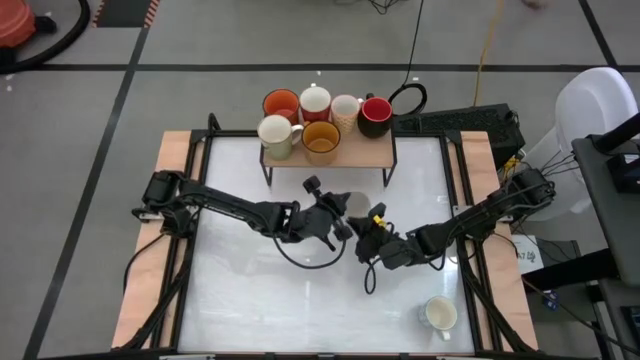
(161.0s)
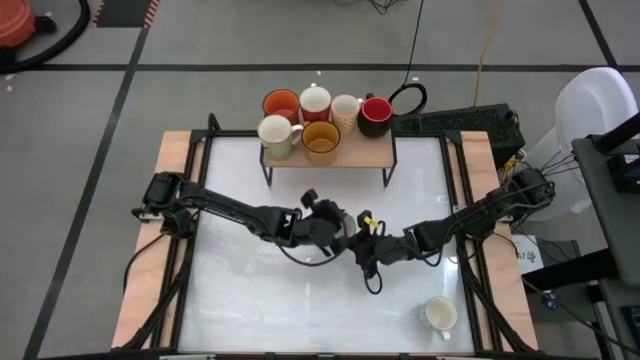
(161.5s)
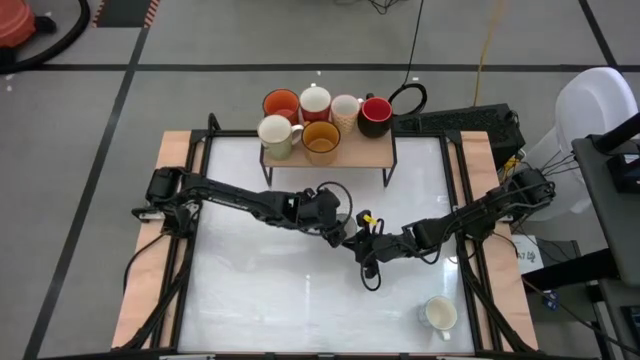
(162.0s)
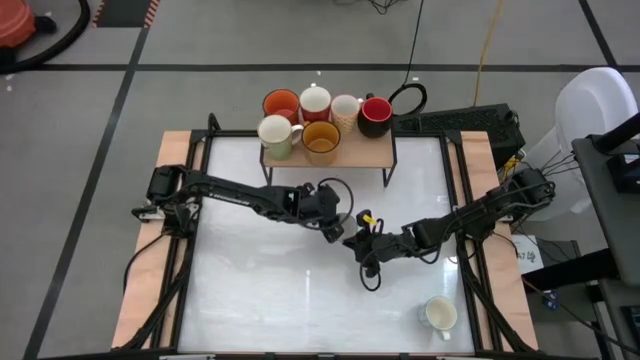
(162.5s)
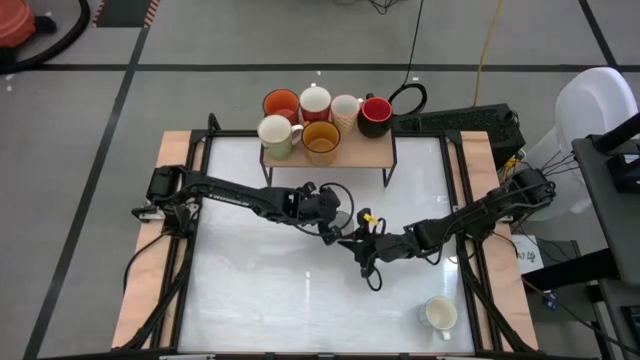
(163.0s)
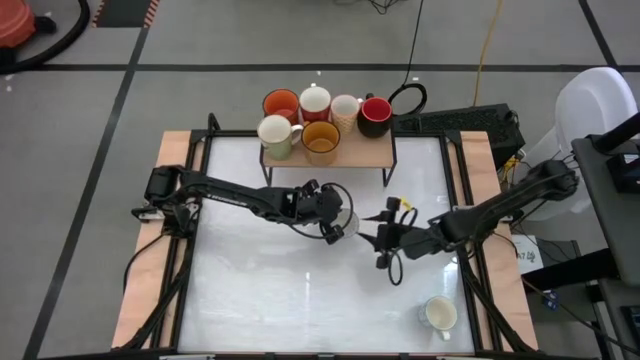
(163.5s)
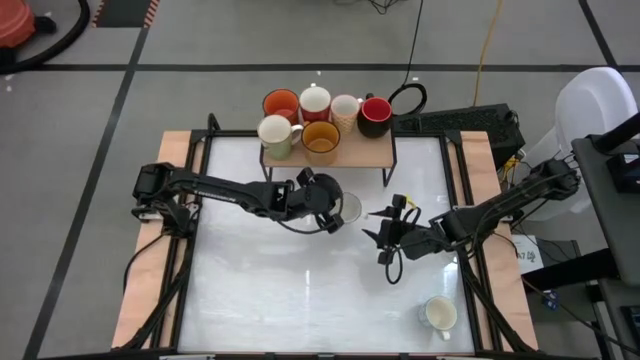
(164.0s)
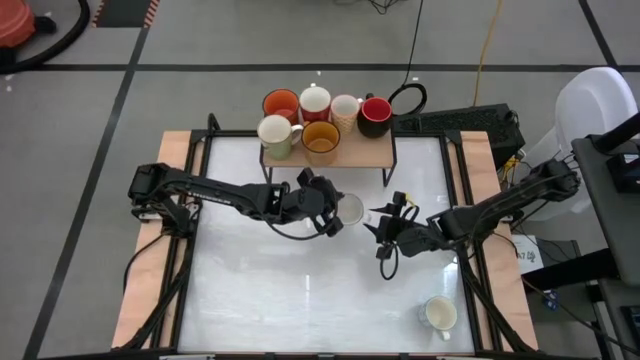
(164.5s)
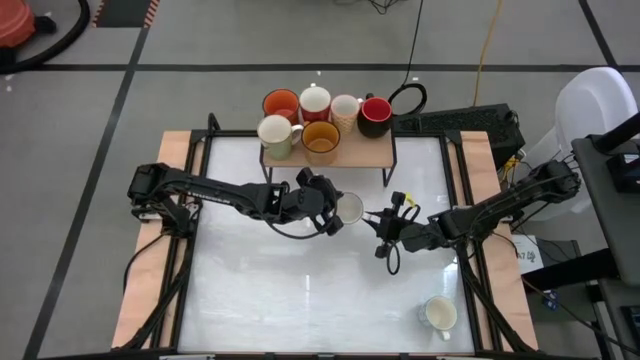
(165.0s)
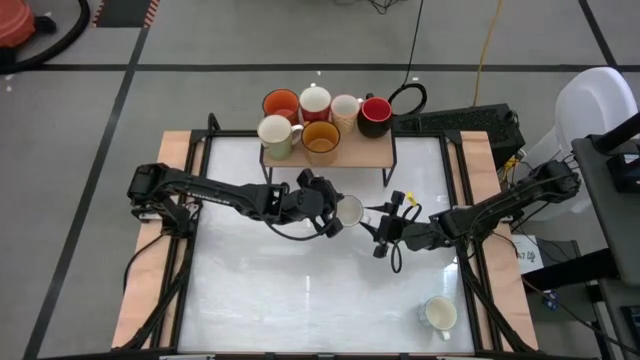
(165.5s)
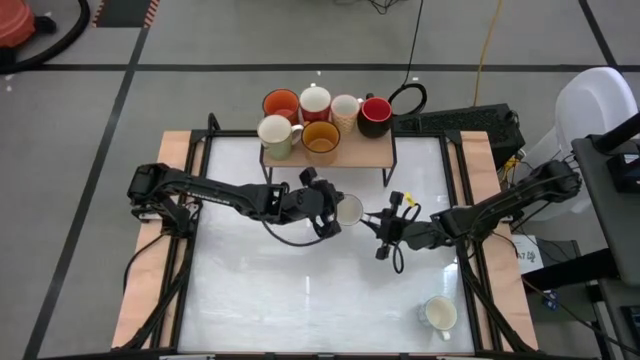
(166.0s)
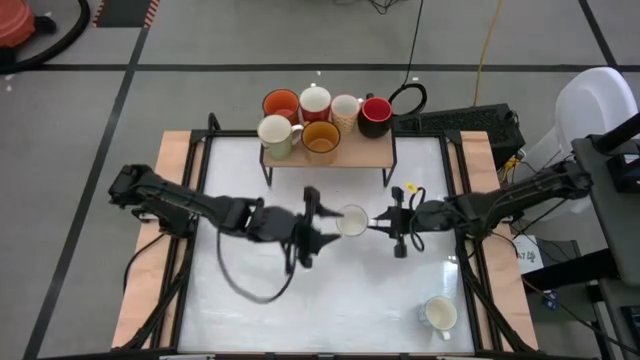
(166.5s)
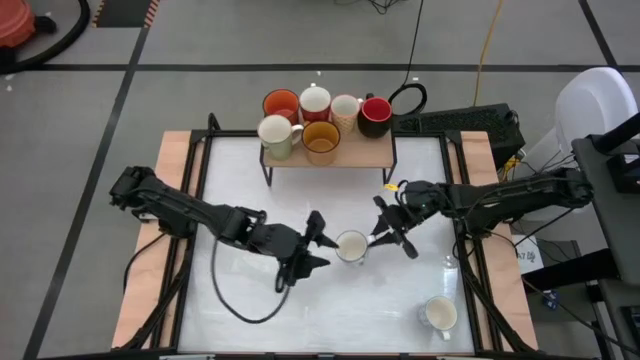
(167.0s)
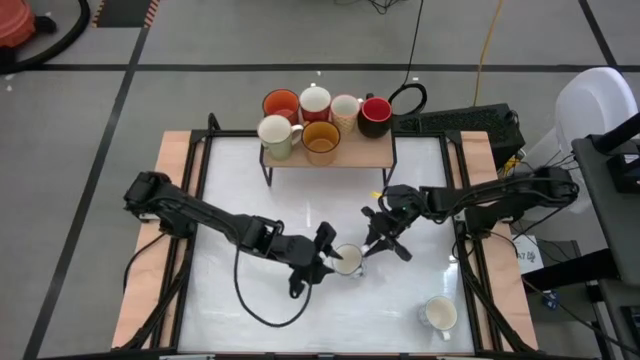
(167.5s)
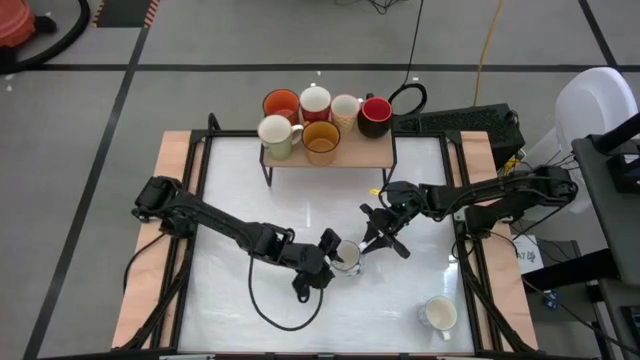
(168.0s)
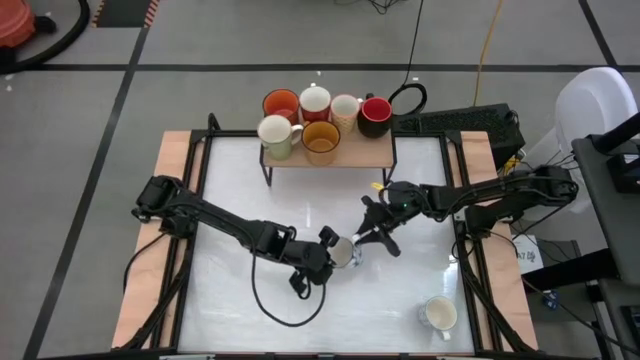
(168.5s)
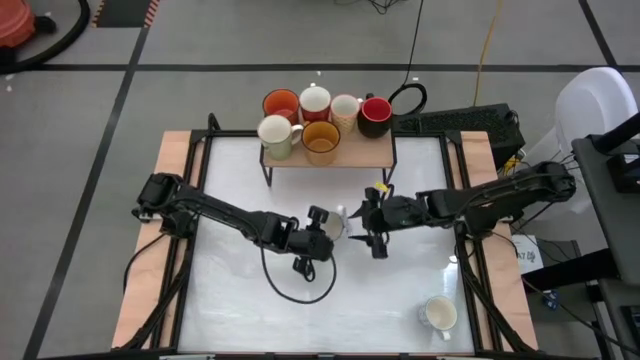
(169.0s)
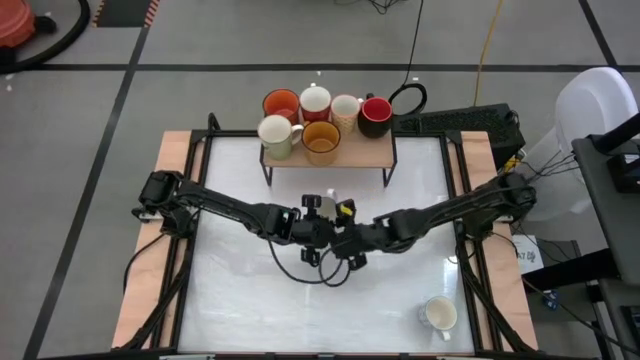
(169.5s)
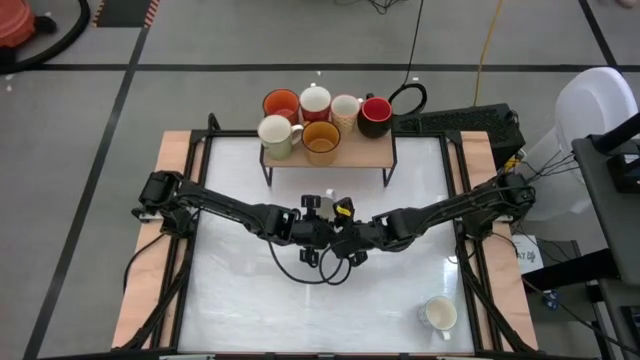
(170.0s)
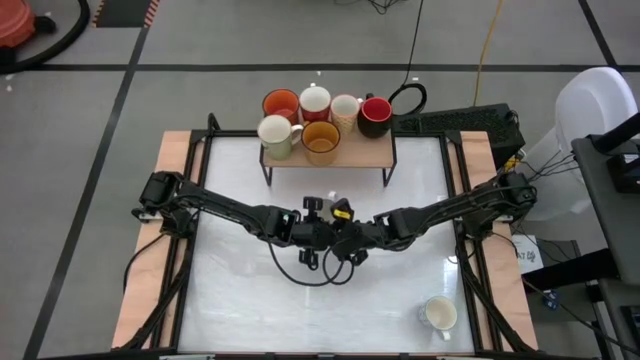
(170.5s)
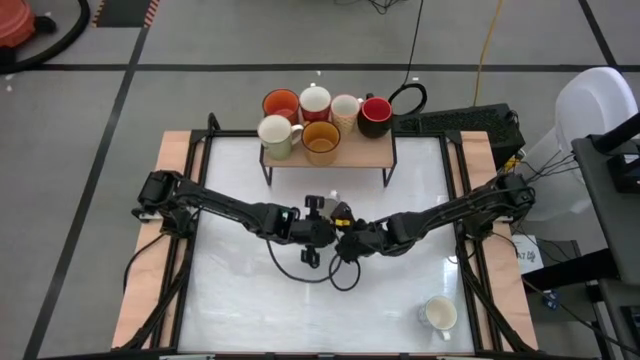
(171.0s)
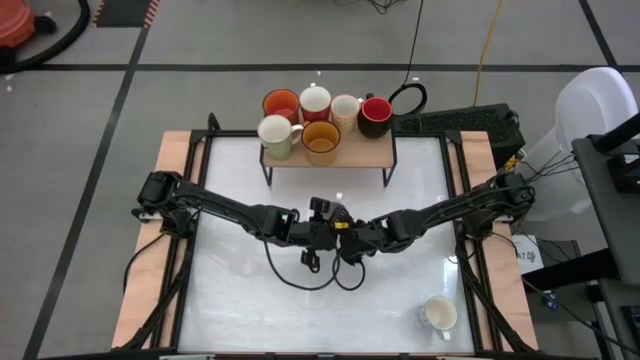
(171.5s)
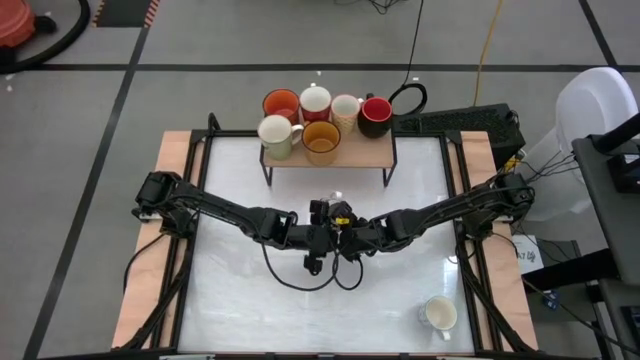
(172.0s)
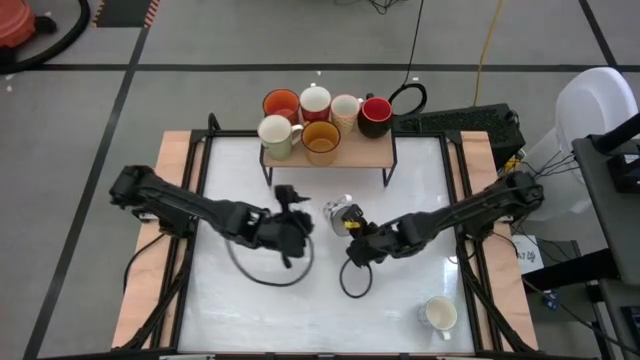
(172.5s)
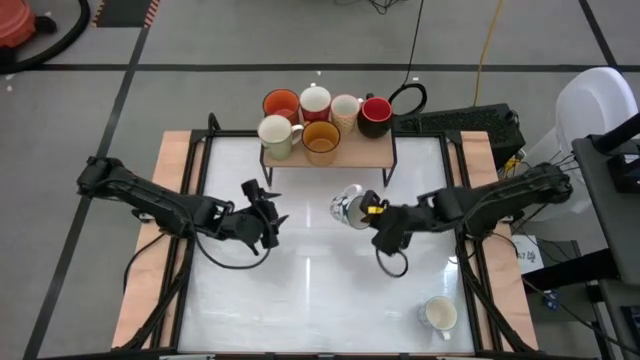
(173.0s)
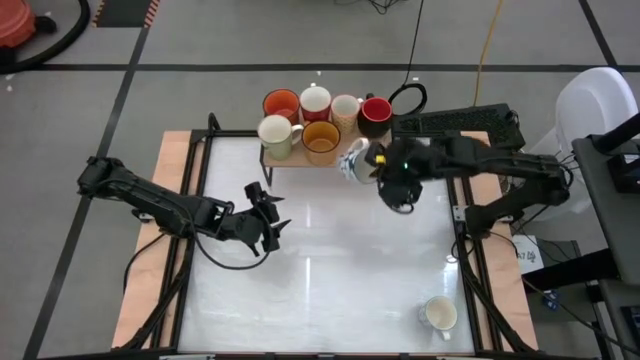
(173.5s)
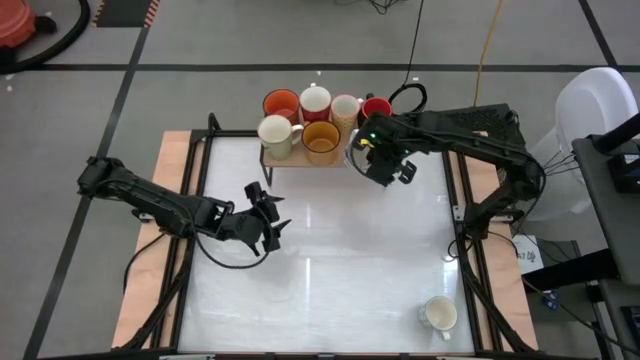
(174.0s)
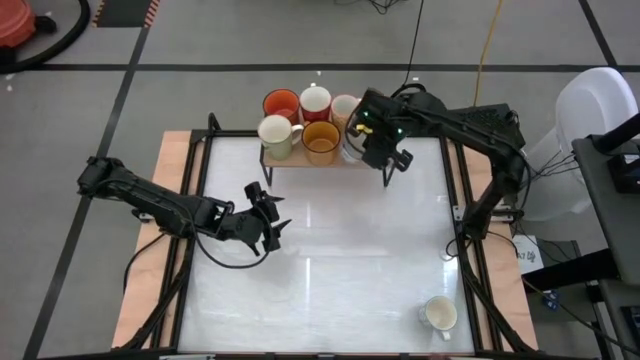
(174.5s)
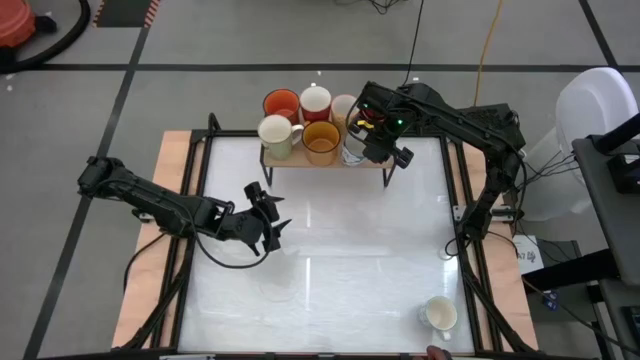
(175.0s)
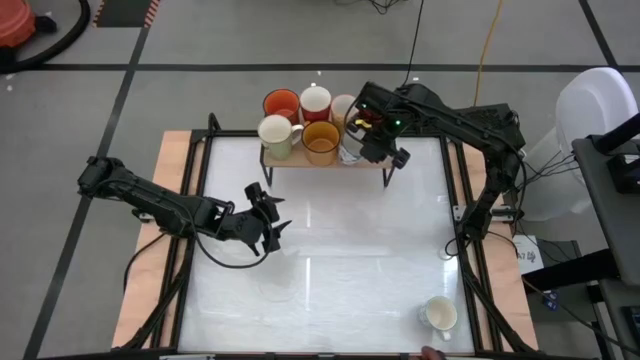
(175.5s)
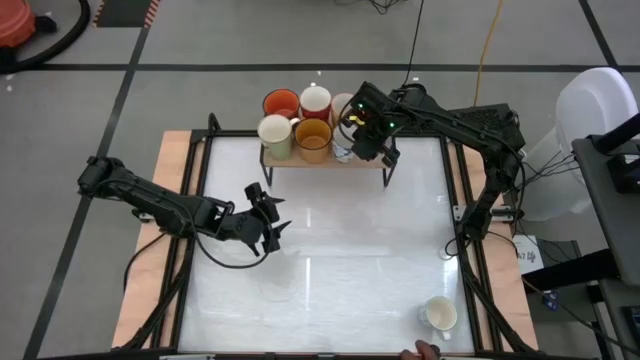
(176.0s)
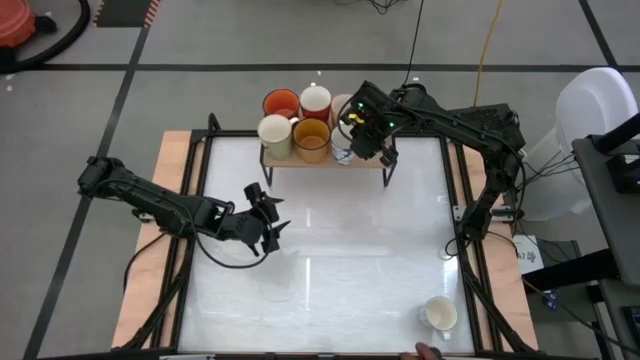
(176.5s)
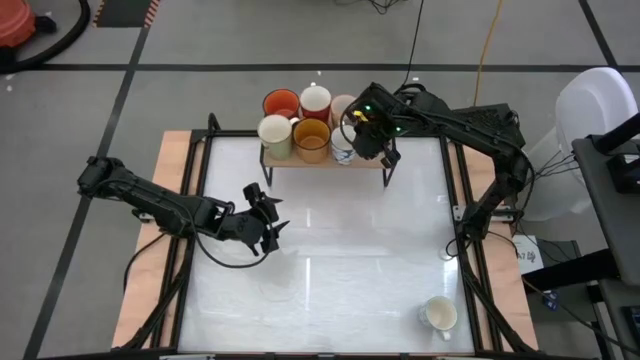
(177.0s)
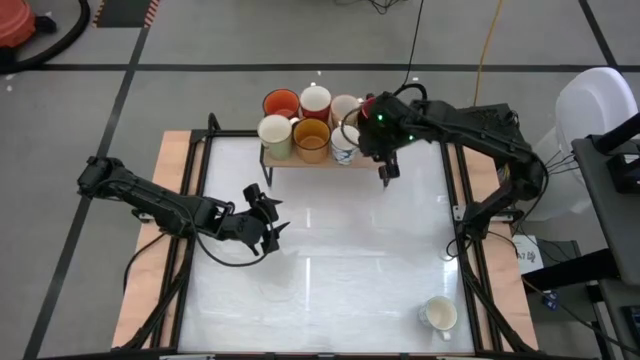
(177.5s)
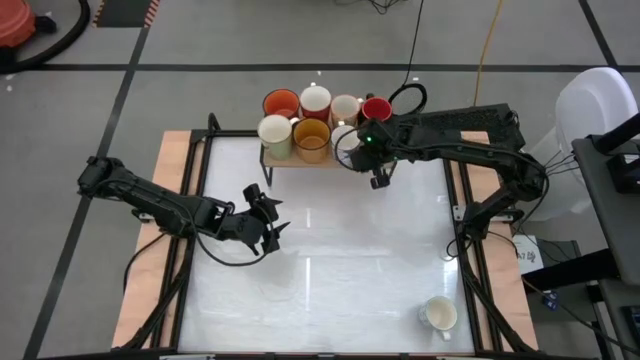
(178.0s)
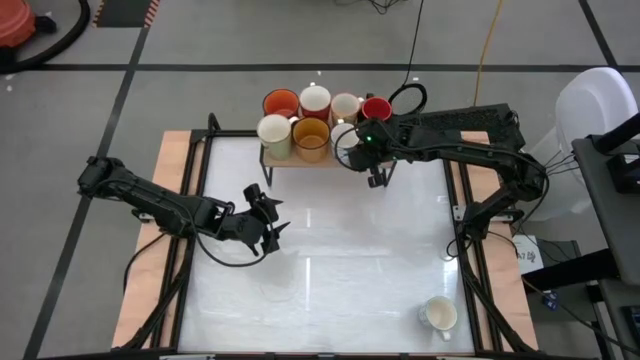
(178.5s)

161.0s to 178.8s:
Task: Place coffee mugs
Put the blue patterned mug on the shelf

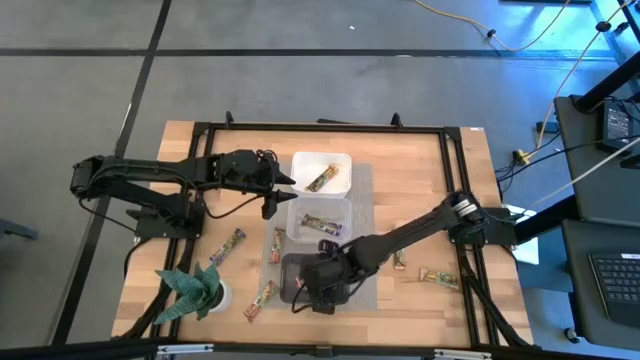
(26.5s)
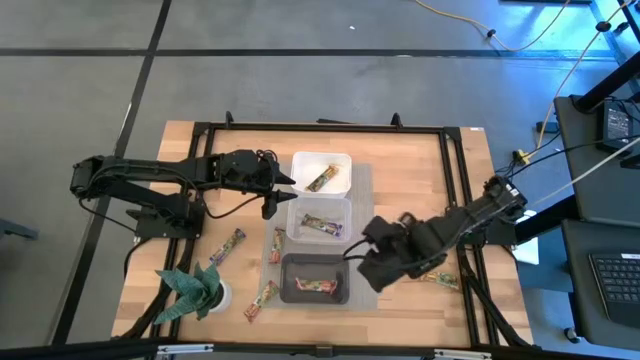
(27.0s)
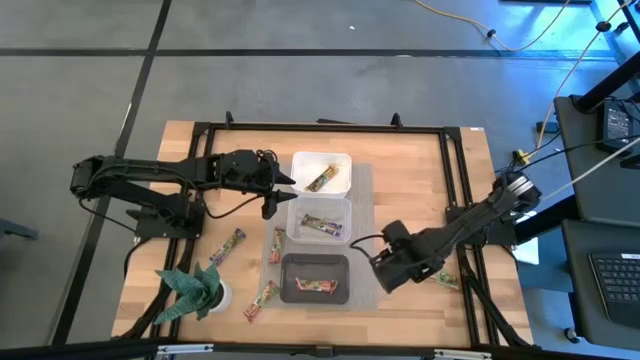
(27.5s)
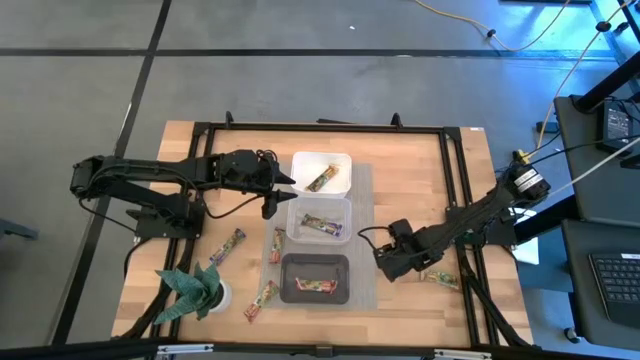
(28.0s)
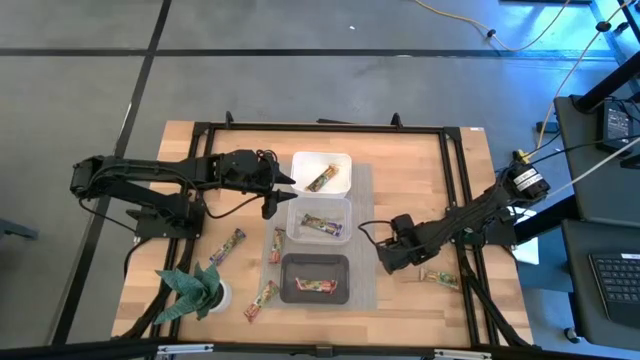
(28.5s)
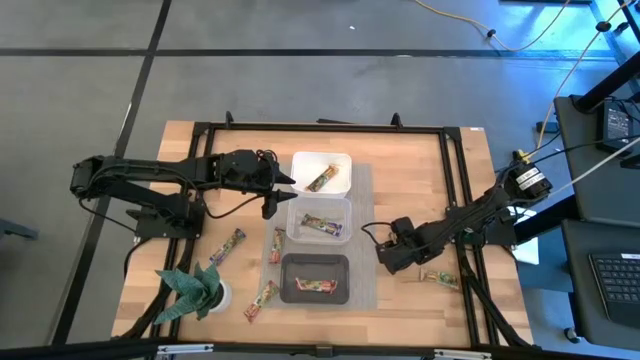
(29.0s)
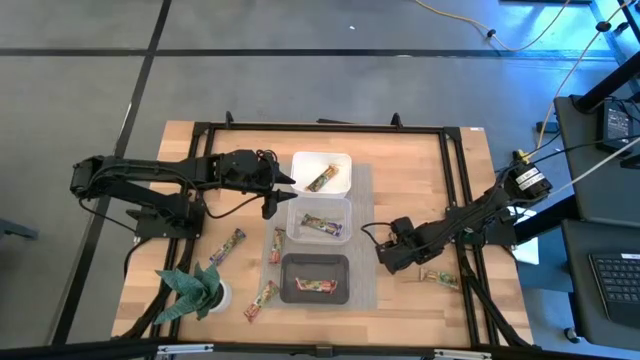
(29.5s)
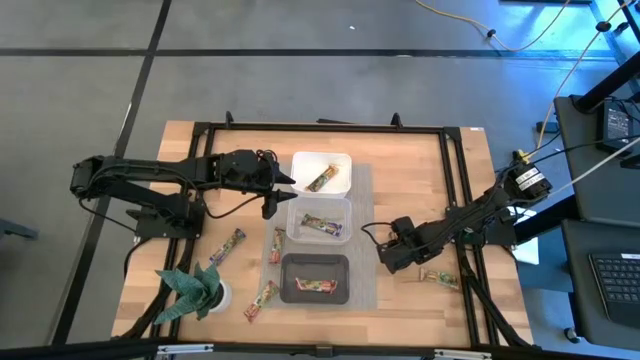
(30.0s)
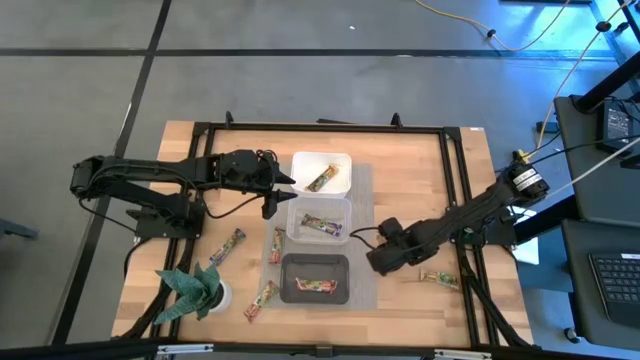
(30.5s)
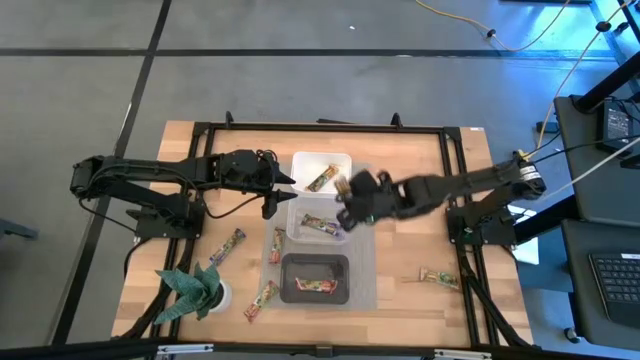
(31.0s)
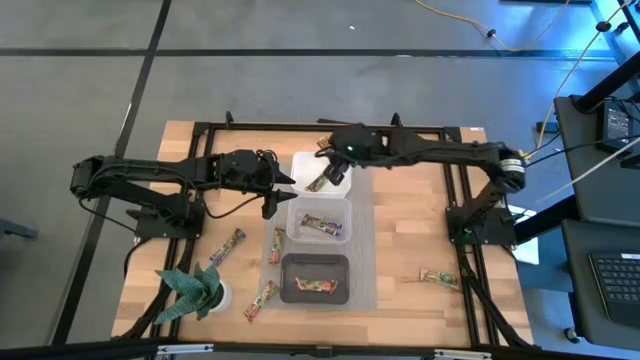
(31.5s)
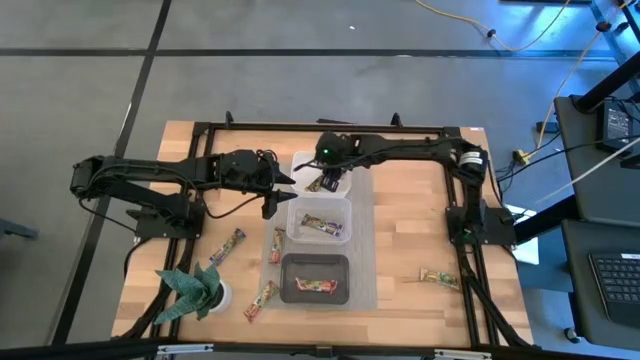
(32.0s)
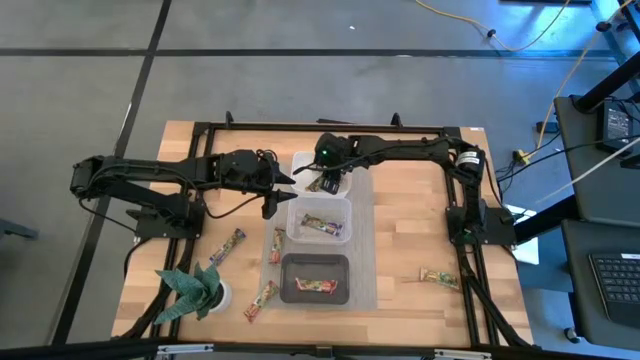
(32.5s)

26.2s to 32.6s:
Task: Pick and place Granola Bars by type
Put the left yellow granola bar into the white bin
